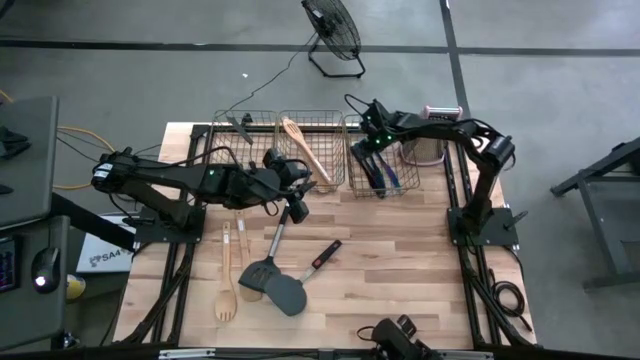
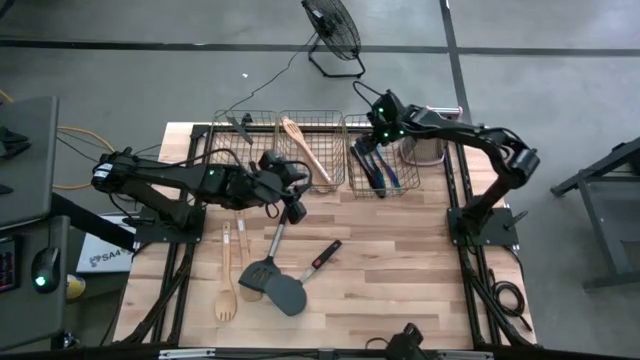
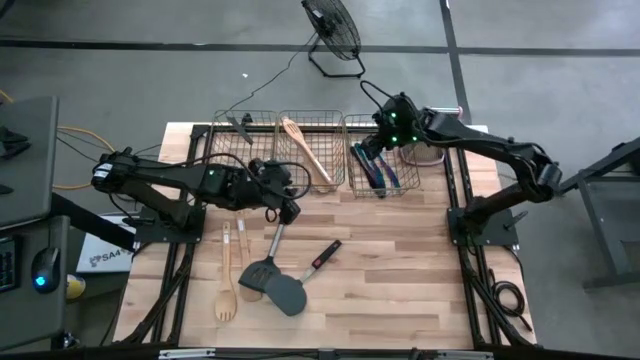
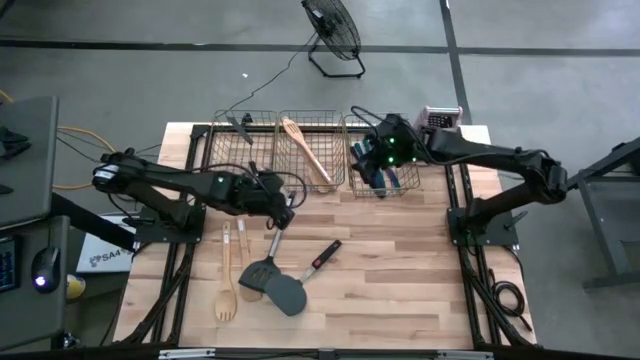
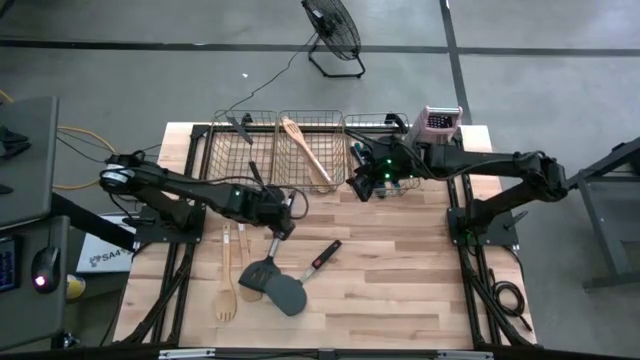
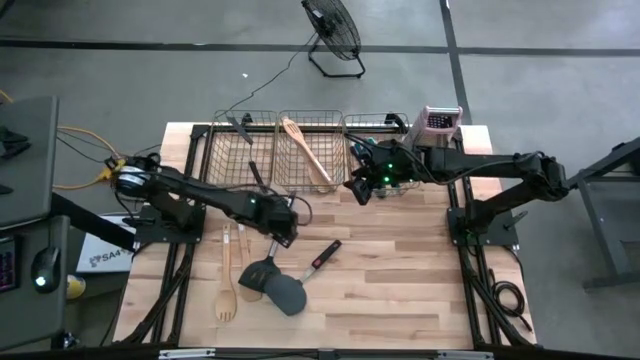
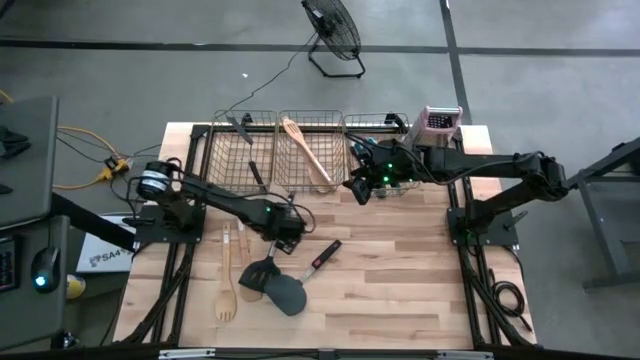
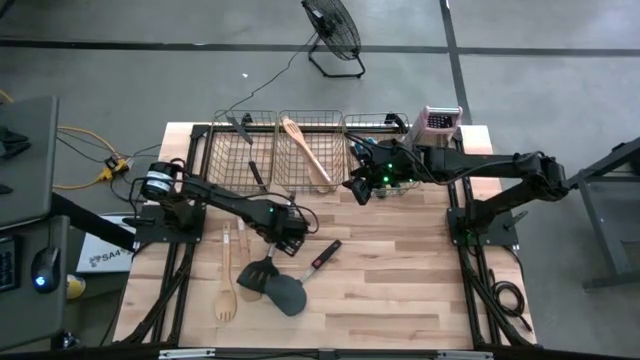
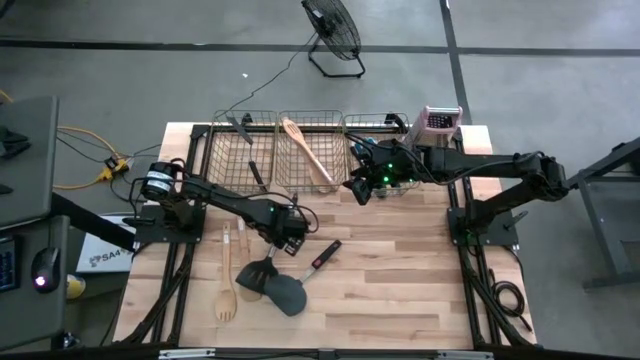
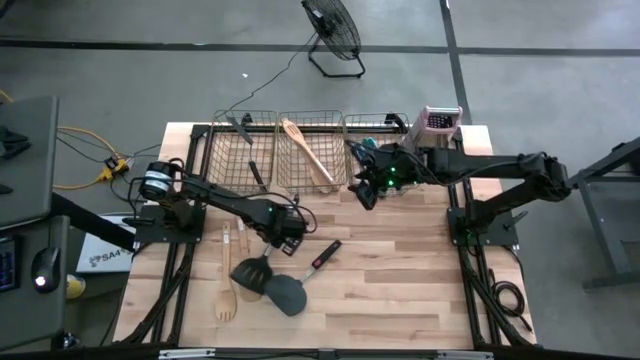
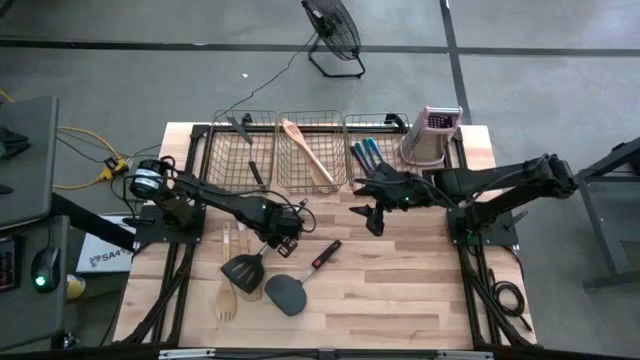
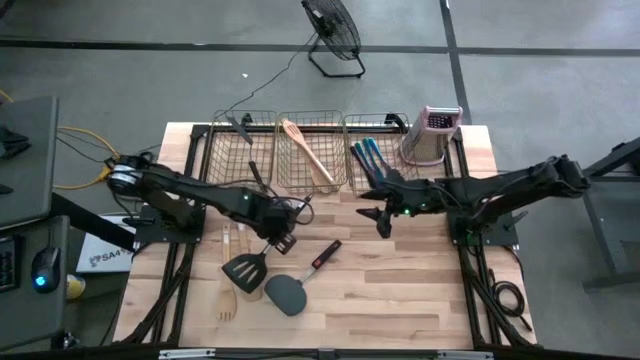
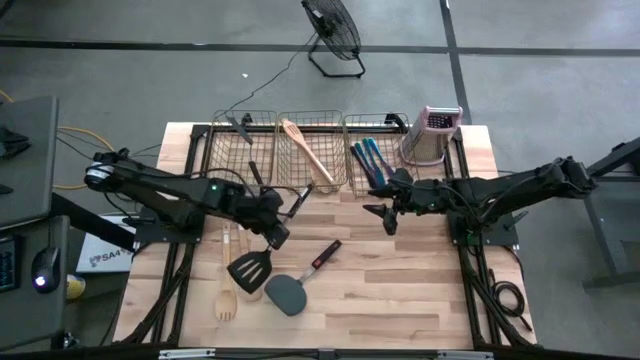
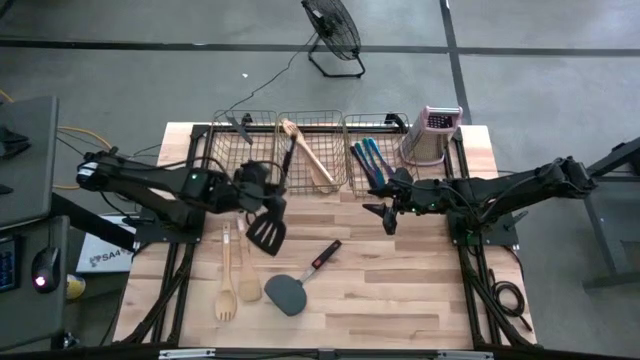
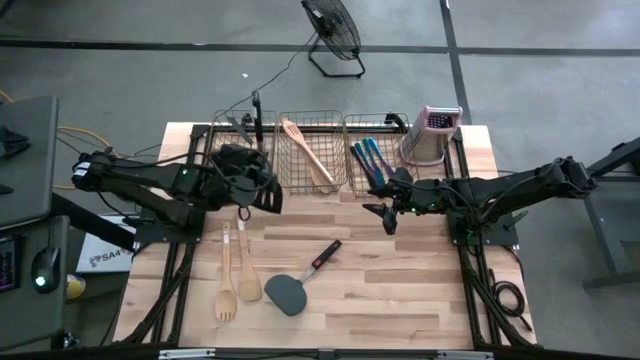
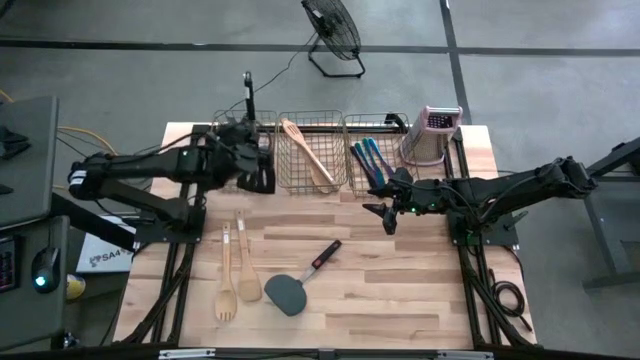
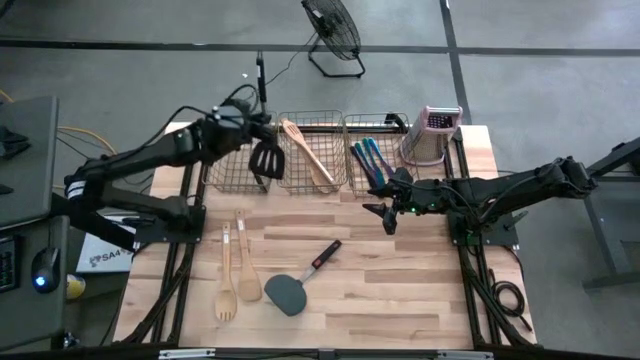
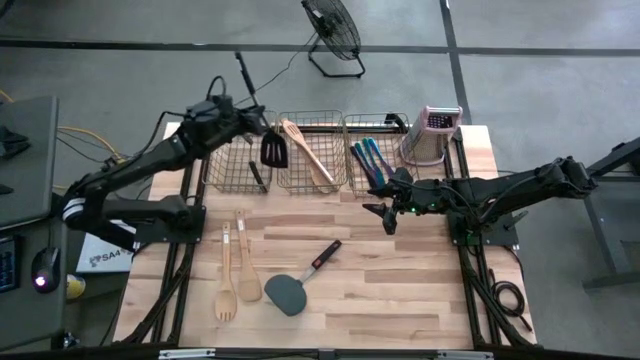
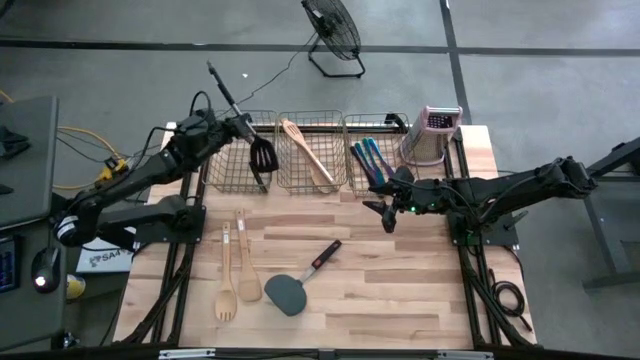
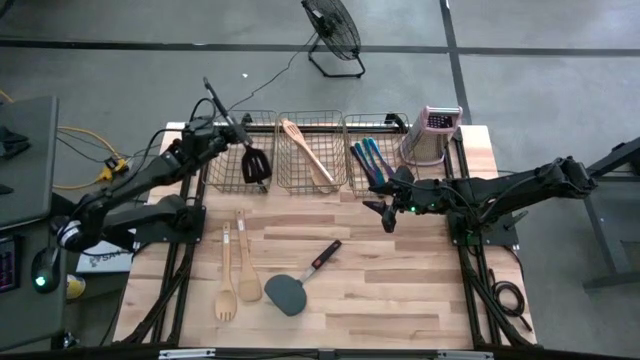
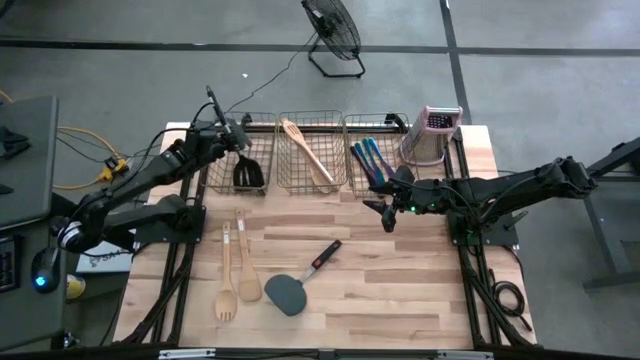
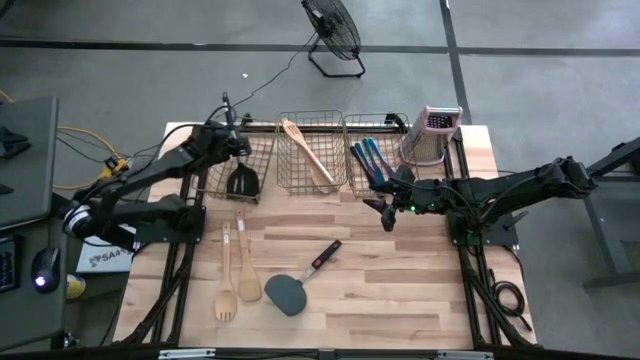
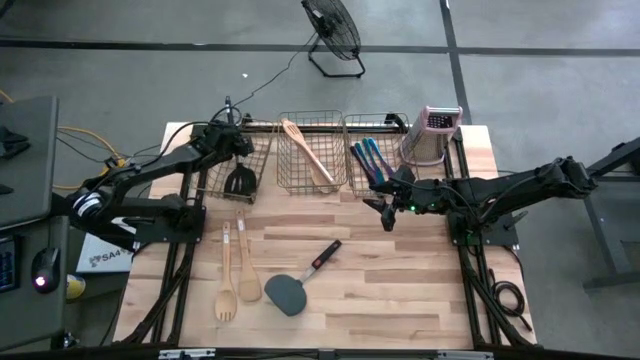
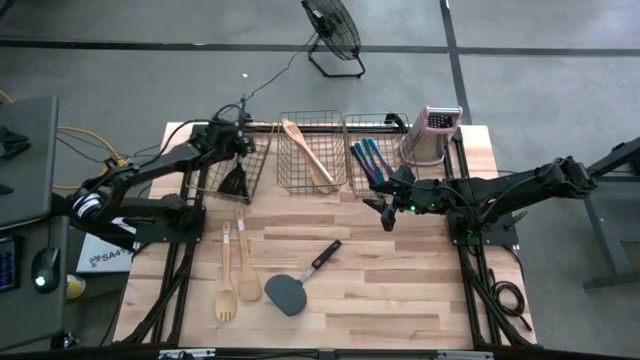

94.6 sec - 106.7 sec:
Task: Pick & Place Kitchen Items
Put the black spatula into the left wire basket

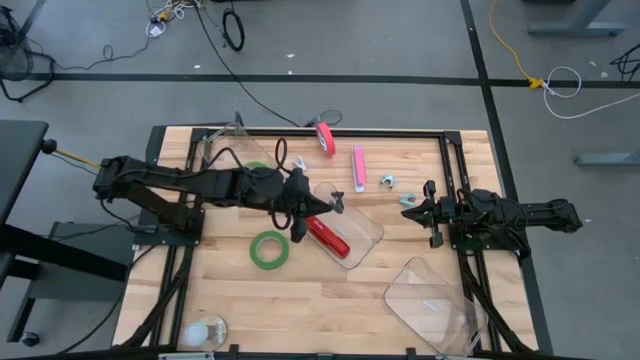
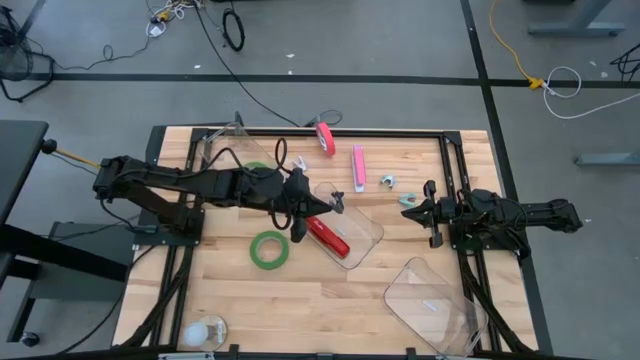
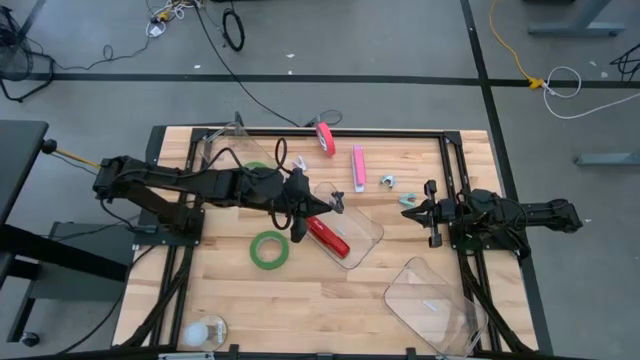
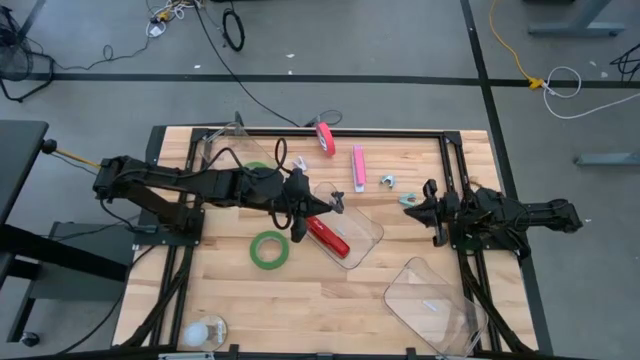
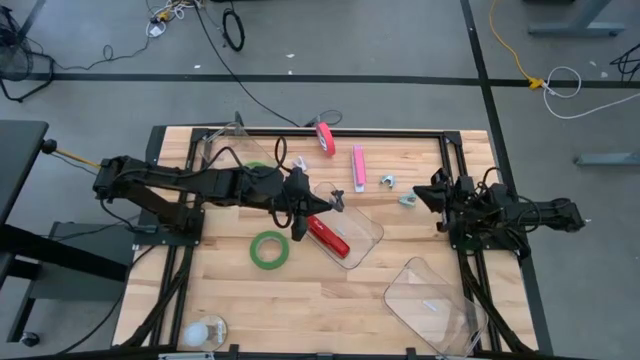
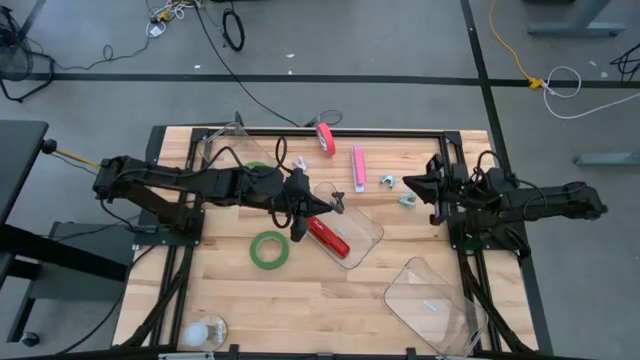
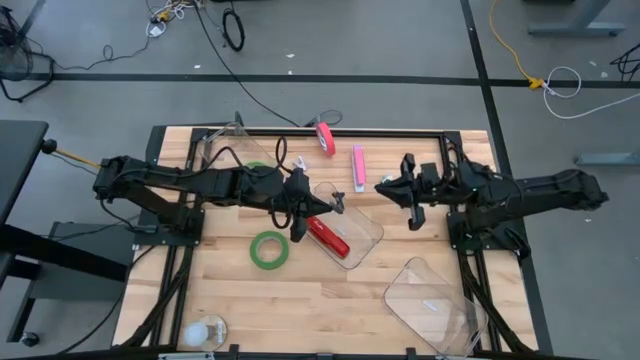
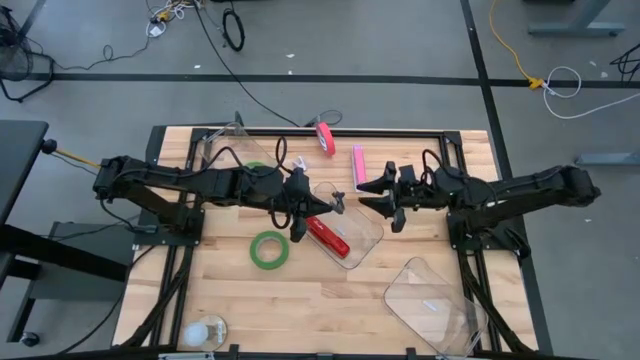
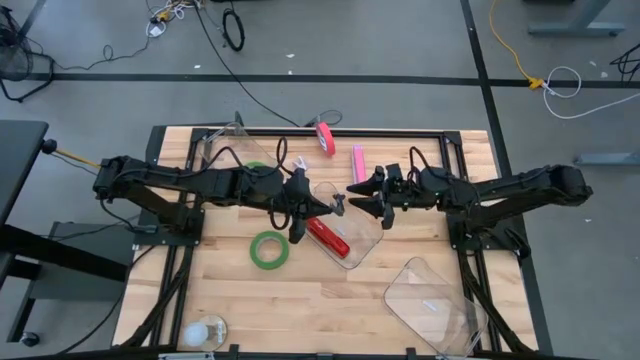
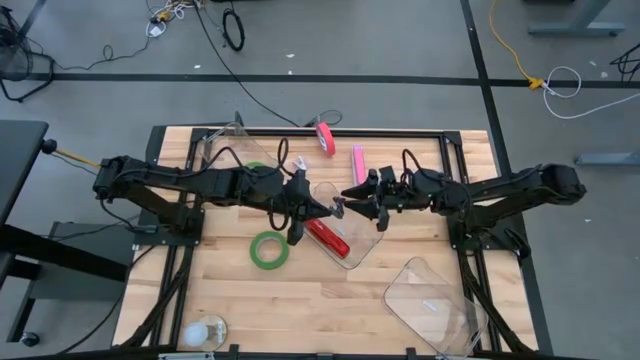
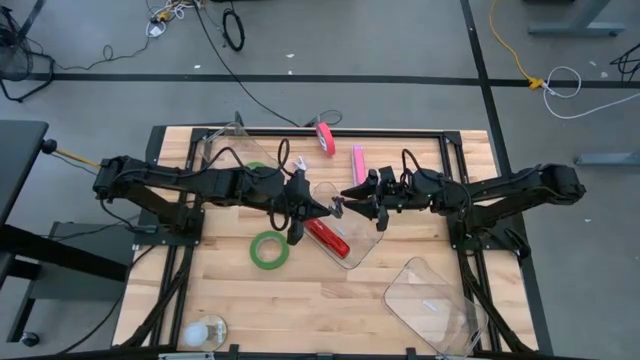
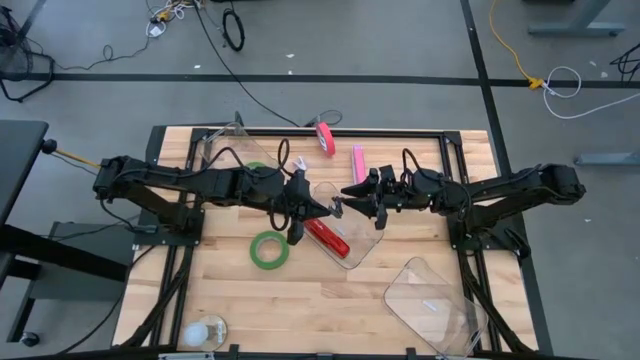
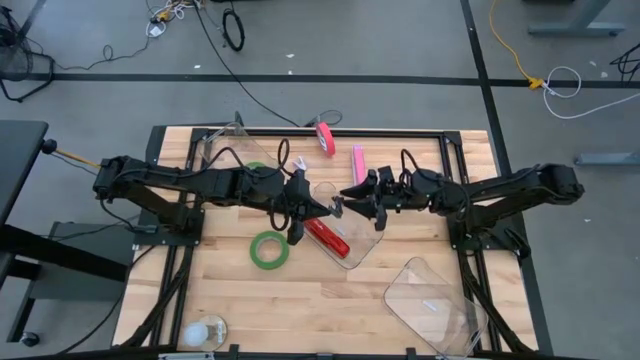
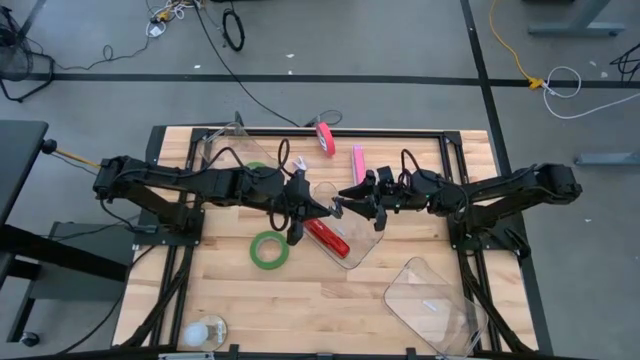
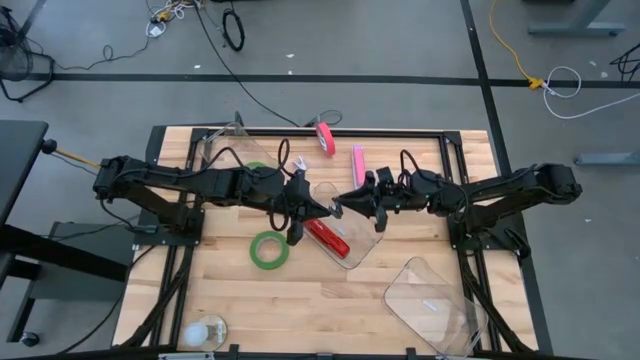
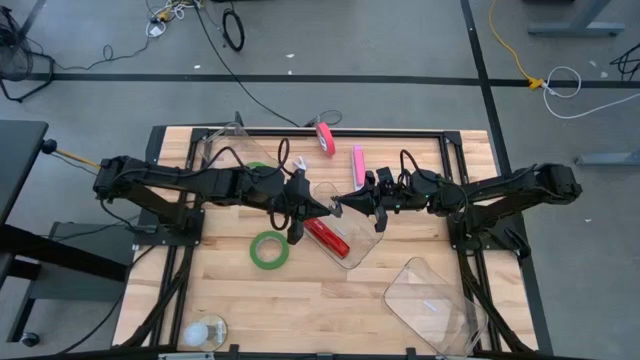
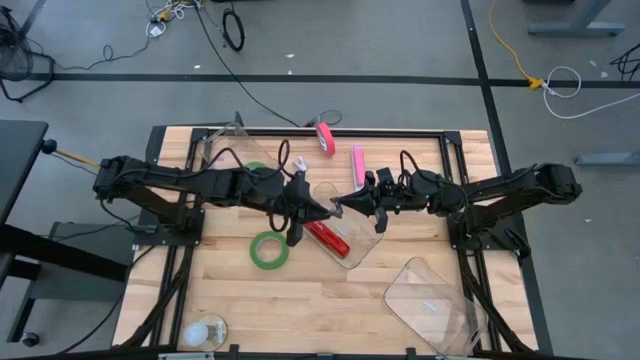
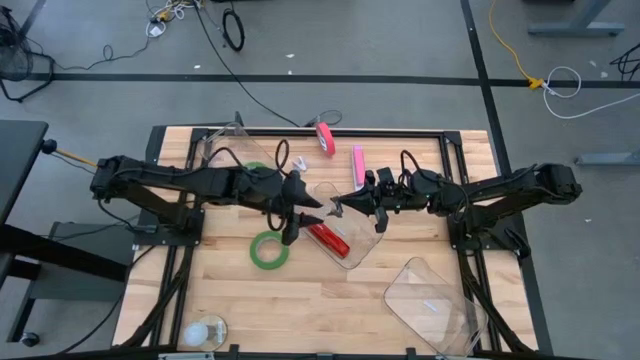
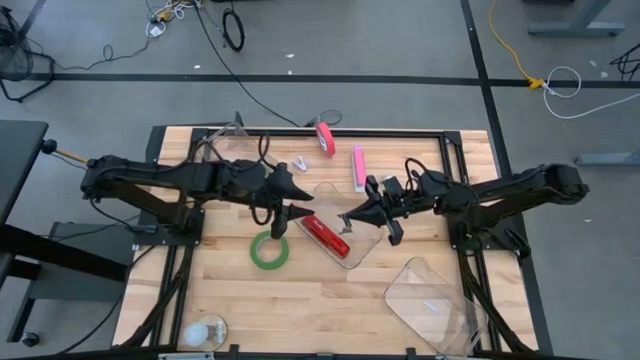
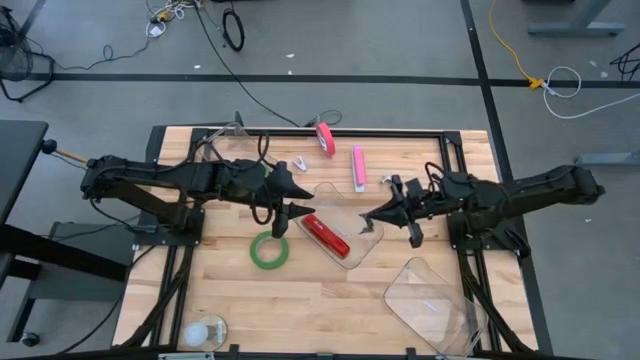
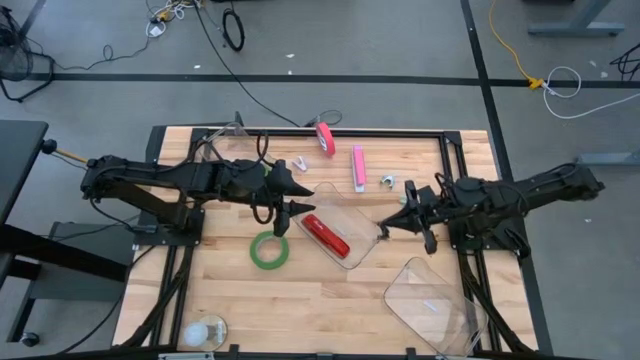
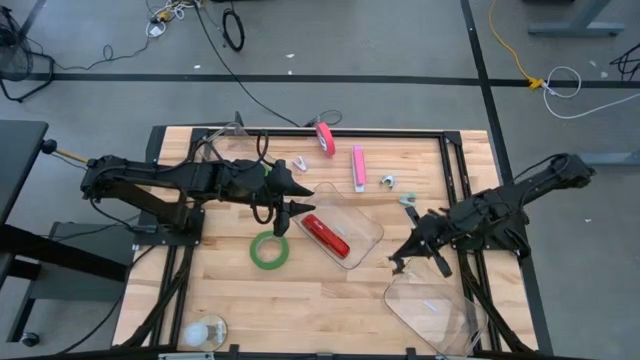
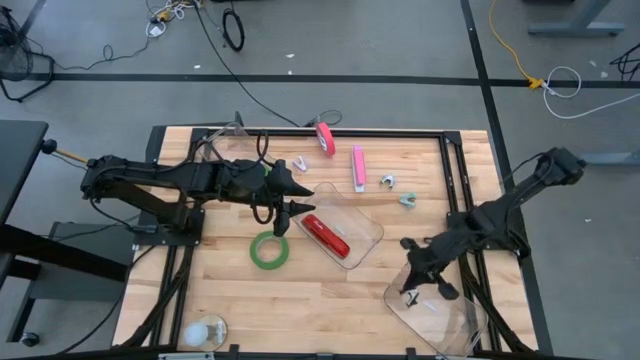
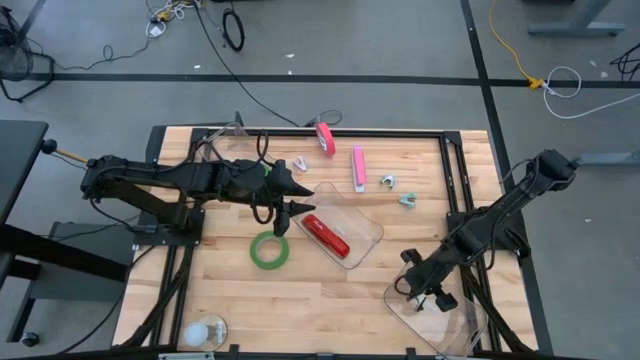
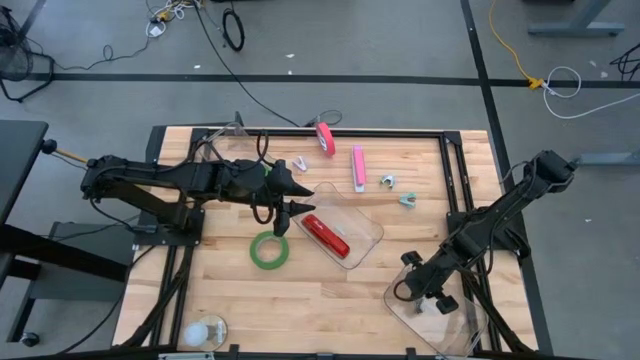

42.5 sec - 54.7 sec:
Task: Pick and place Stapler, Stapler remover, tape
Put the black staple remover into the bottom transparent bin
